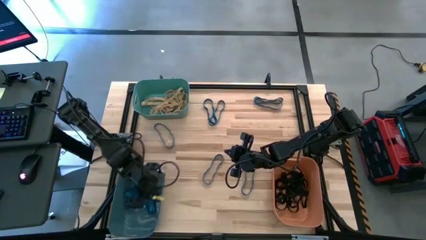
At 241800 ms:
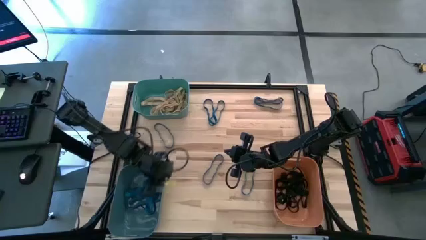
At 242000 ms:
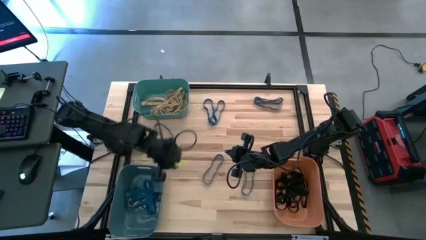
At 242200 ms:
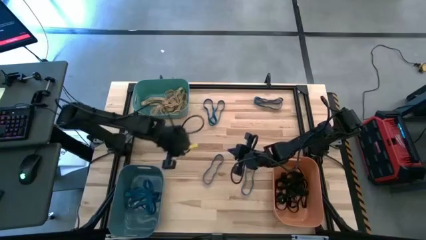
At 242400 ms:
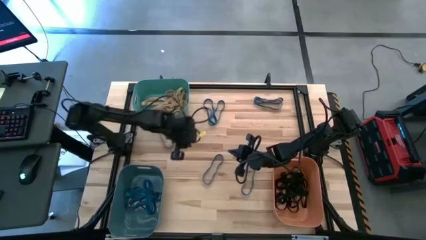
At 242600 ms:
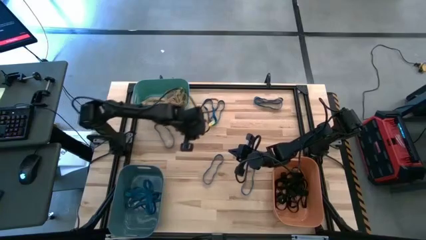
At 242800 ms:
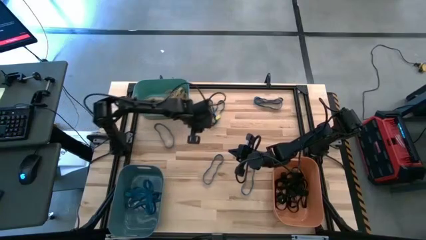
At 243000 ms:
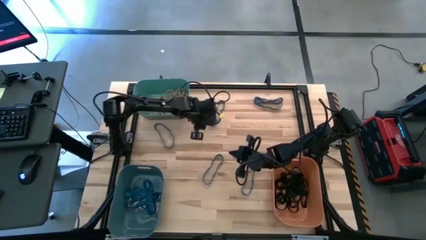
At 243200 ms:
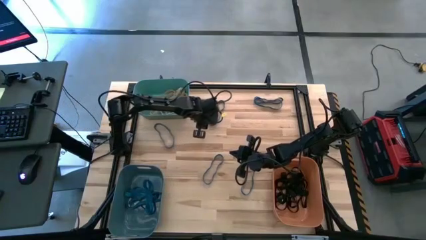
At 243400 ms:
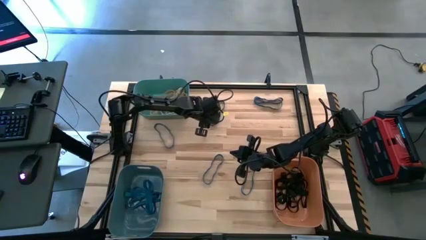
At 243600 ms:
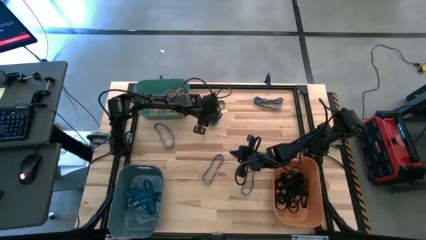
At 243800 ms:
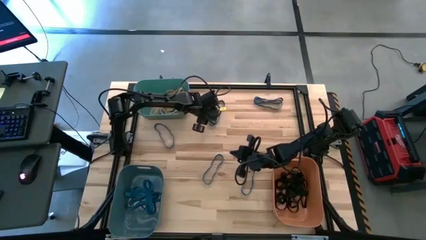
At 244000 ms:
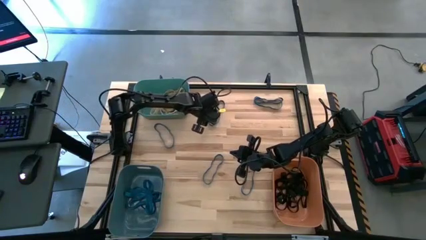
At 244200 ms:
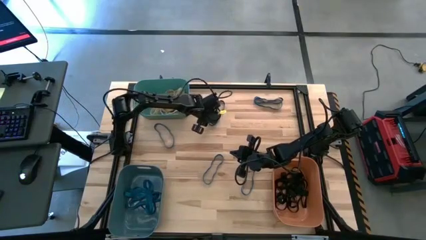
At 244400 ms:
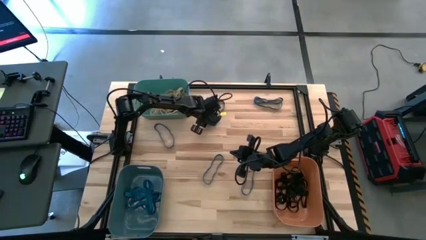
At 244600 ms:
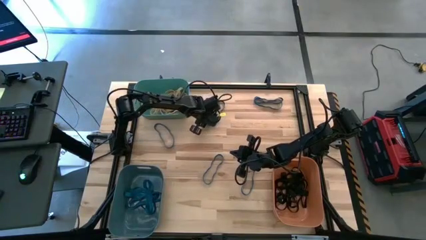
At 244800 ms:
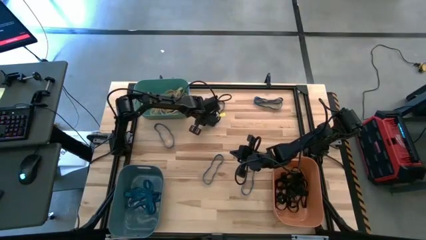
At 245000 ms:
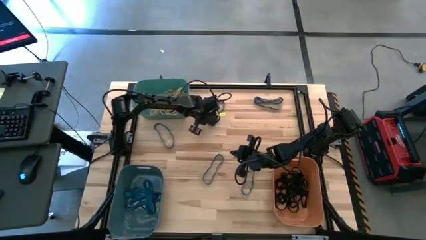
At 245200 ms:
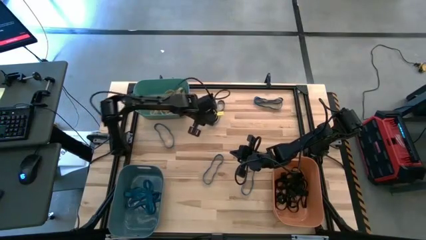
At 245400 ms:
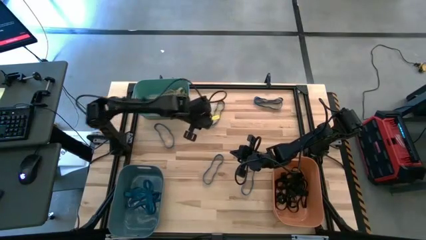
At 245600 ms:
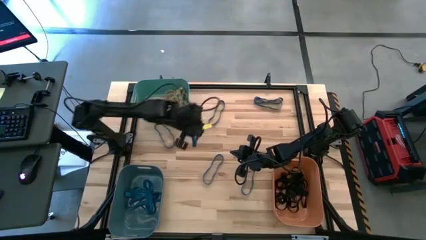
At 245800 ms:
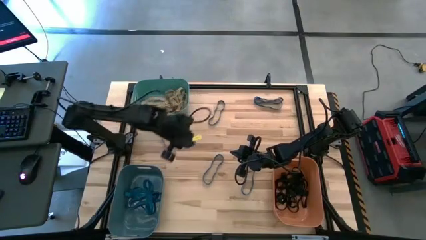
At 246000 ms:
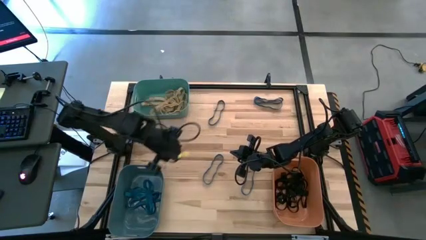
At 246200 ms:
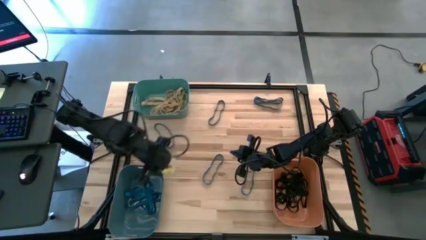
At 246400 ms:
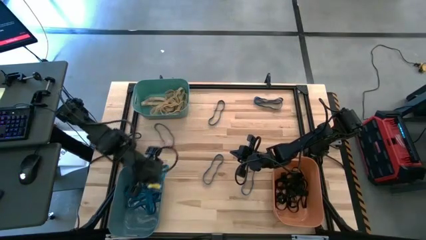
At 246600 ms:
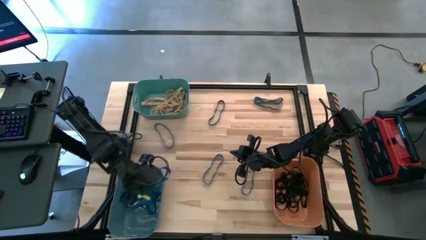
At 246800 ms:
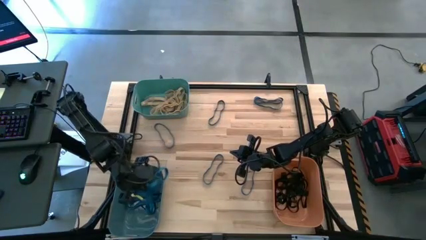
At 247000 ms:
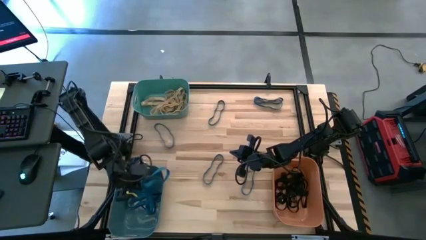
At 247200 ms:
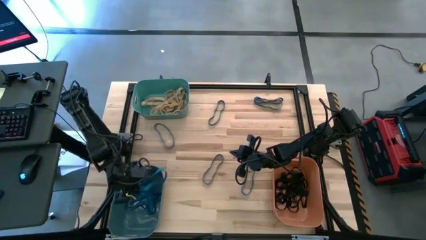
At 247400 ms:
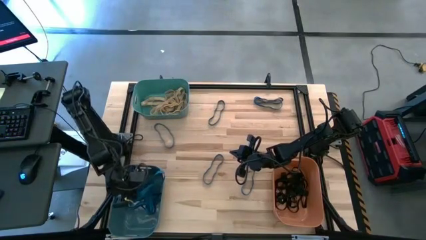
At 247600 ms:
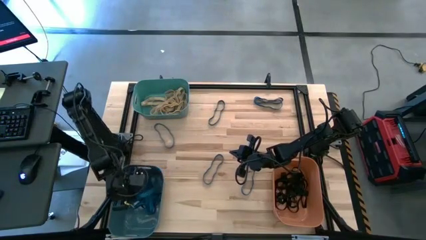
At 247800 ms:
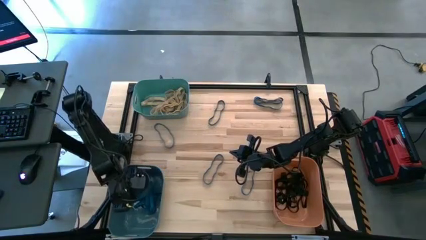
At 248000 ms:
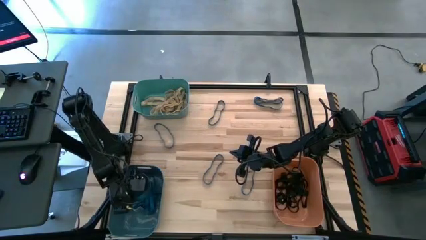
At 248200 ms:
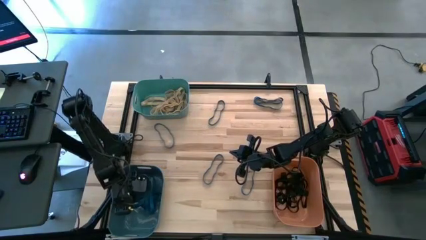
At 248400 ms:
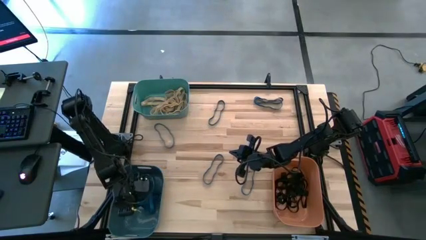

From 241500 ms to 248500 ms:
Task: Sort rubber bands into baskets
Put the blue rubber band into the blue bin

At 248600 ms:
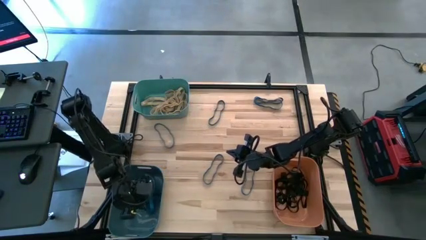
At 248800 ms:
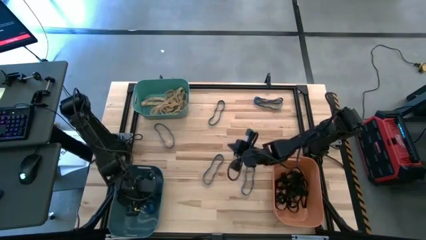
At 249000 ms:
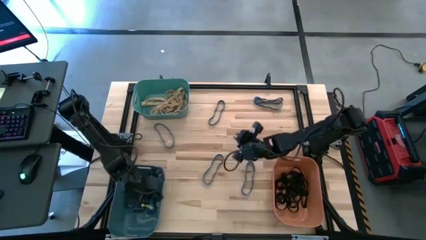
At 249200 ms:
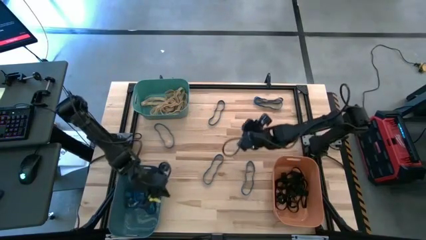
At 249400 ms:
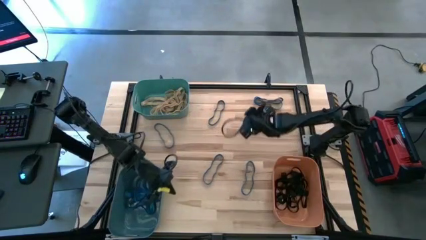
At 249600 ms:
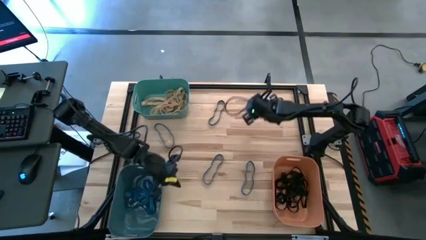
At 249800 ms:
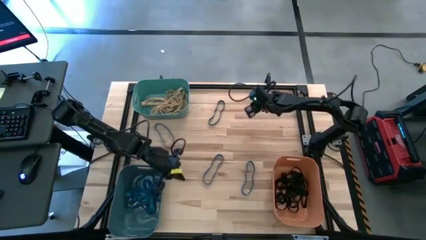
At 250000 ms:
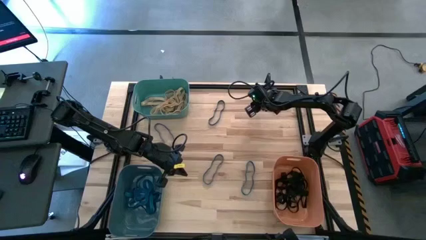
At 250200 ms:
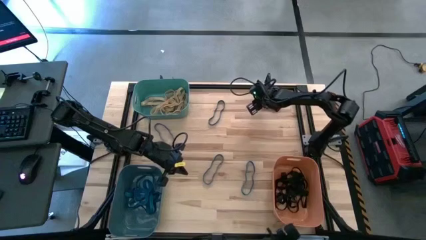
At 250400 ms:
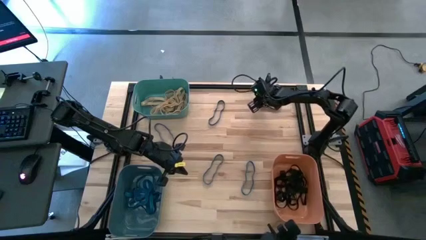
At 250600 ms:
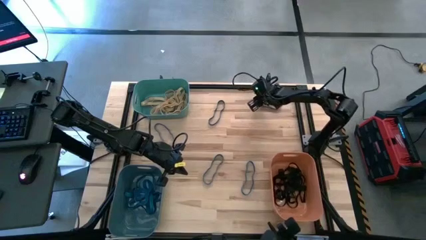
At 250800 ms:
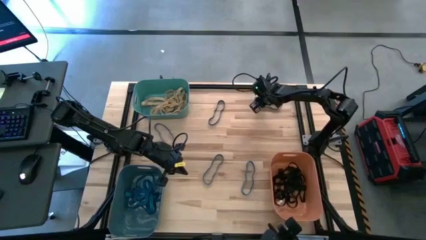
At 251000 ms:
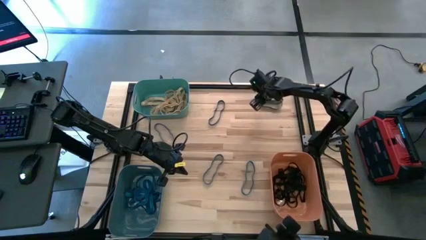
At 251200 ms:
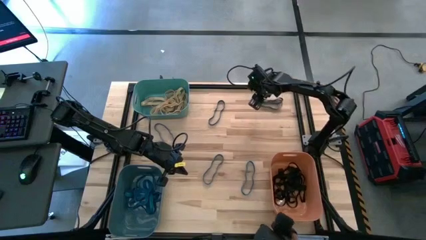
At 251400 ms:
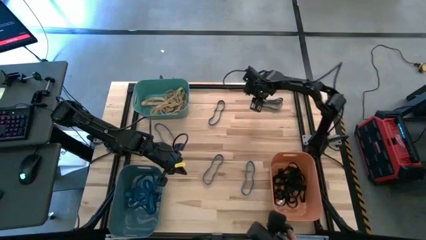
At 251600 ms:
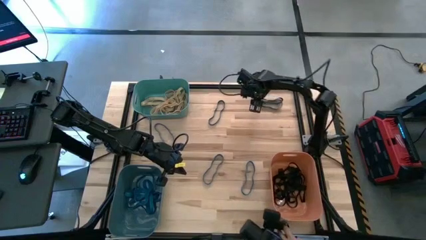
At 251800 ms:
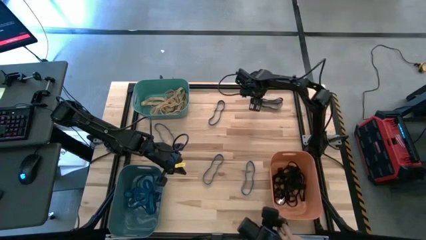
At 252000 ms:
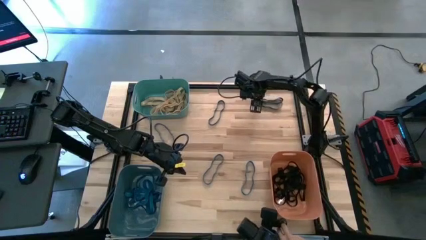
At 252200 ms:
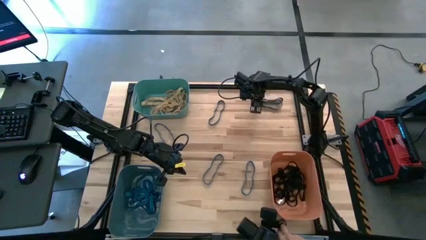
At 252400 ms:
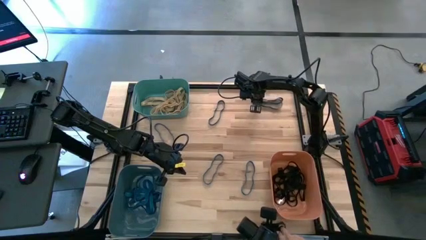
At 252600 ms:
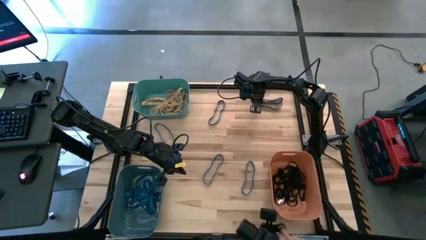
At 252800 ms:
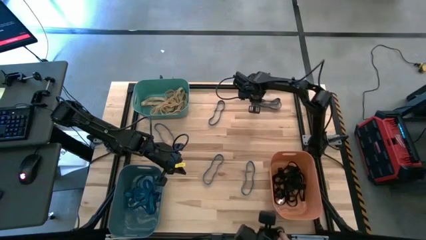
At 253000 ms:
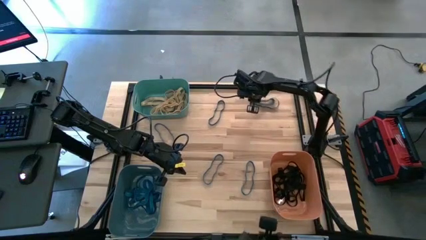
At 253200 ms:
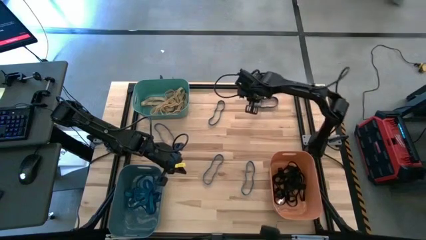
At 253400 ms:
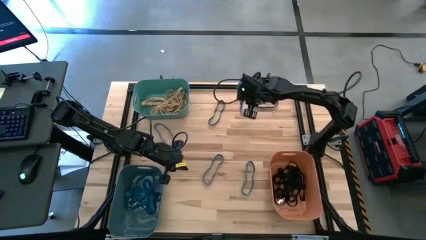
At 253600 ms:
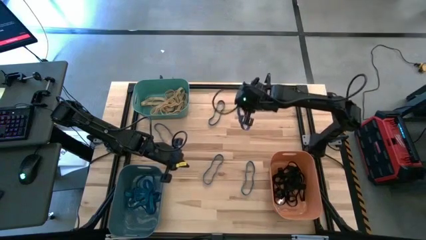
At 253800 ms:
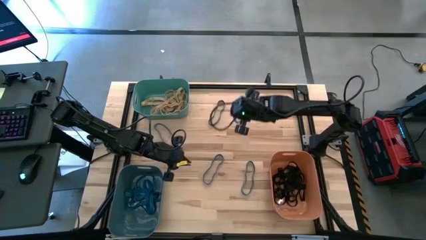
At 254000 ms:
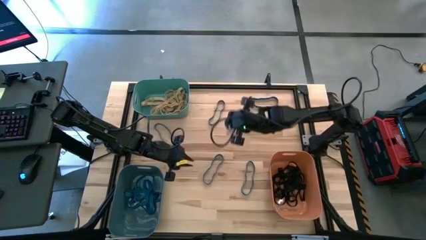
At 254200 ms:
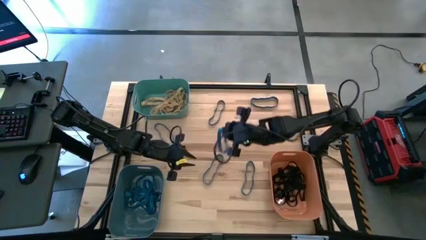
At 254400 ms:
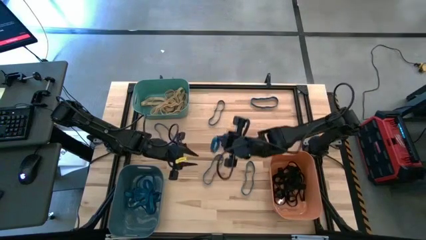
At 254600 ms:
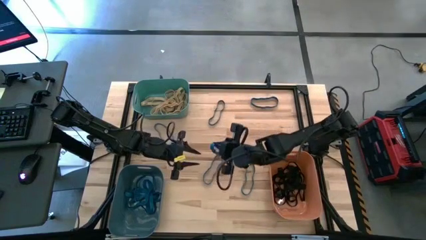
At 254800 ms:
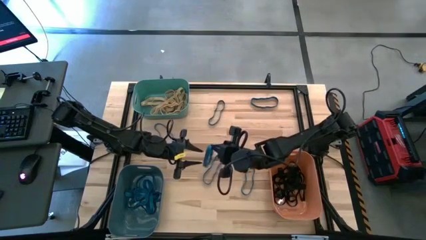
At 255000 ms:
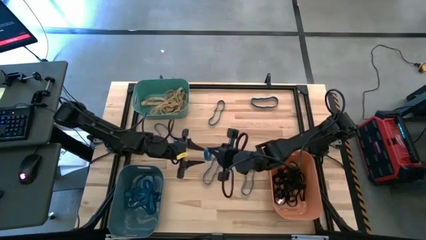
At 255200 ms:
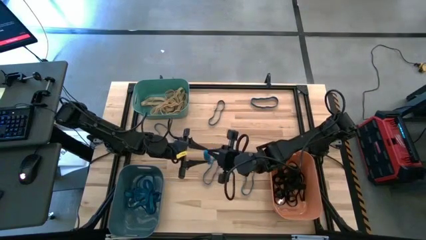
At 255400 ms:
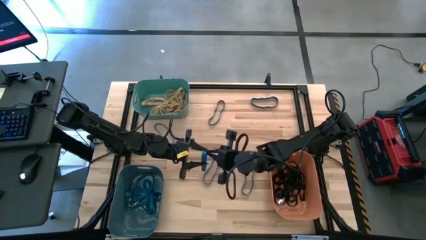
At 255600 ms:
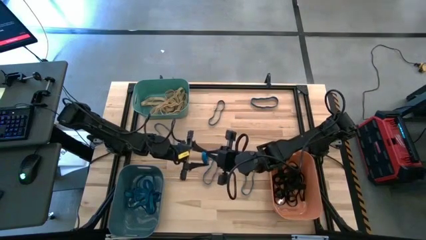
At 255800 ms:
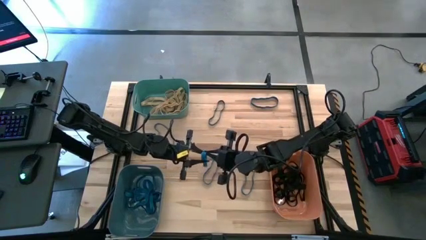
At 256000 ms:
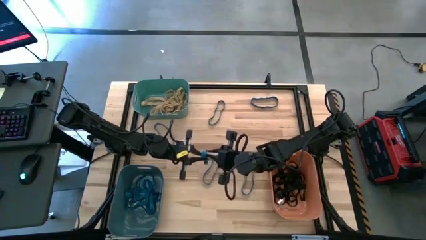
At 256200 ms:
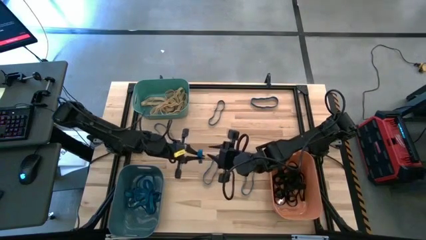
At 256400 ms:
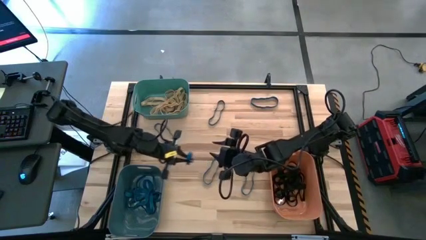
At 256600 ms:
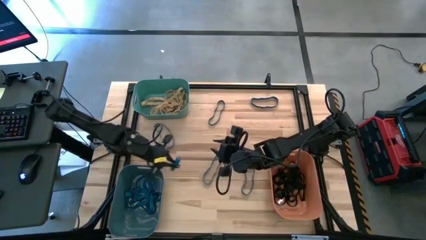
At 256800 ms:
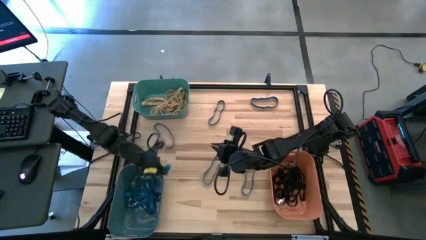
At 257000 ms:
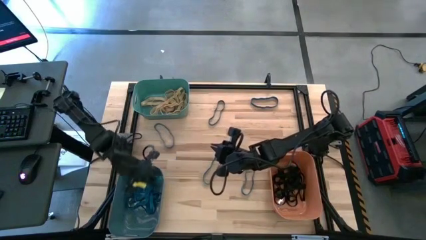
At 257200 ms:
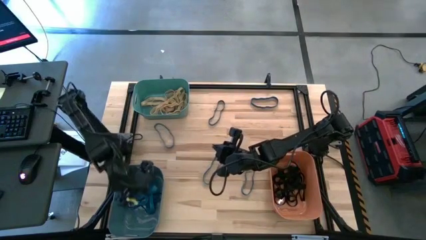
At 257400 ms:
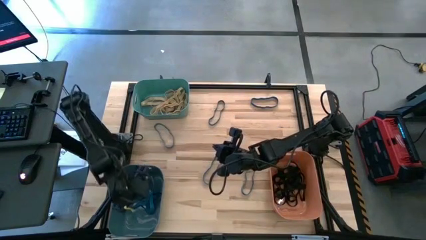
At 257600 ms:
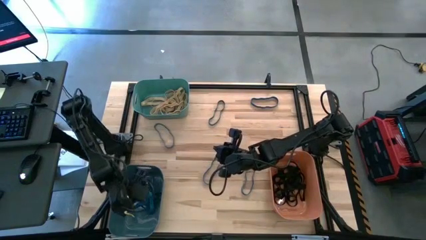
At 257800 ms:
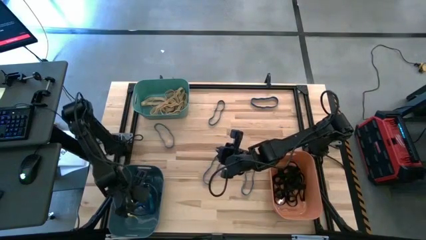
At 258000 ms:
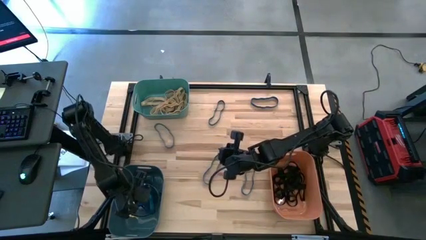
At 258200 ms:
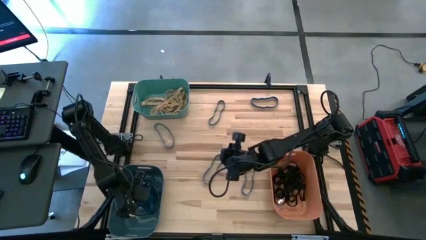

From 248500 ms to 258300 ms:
Put the blue rubber band into the blue bin
